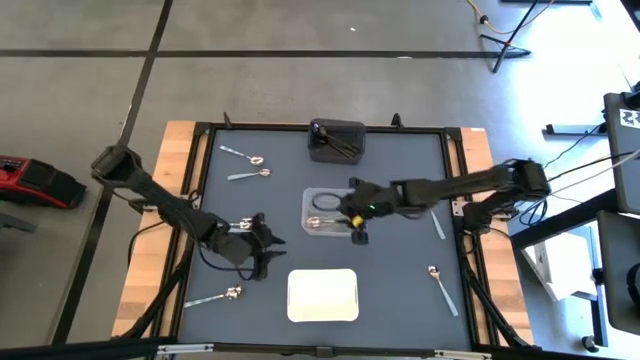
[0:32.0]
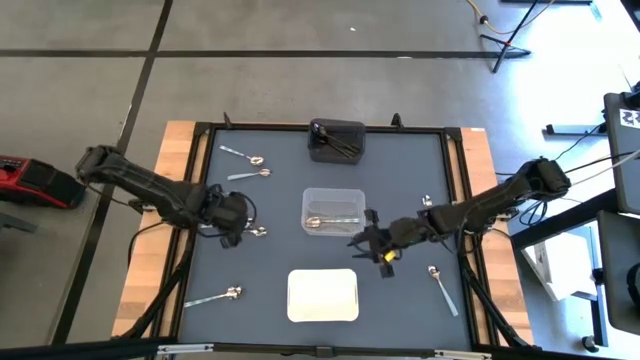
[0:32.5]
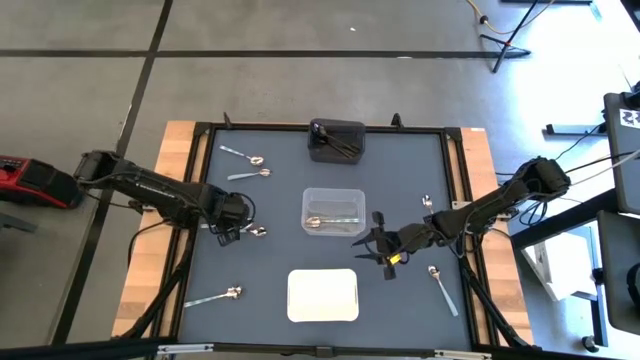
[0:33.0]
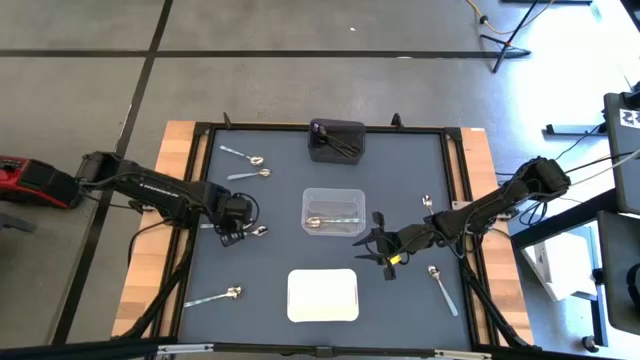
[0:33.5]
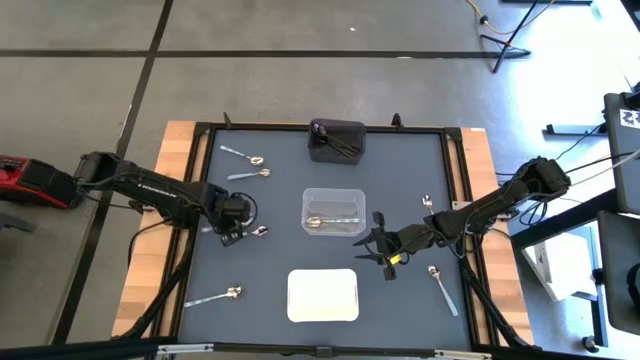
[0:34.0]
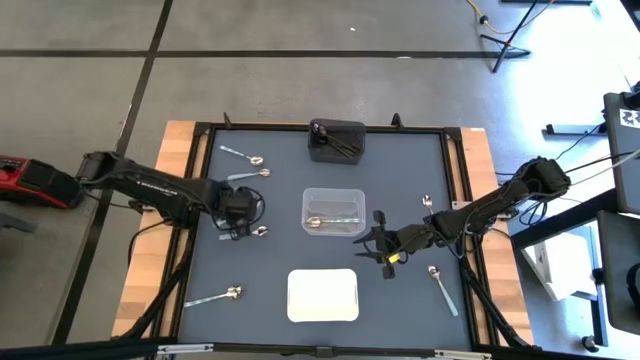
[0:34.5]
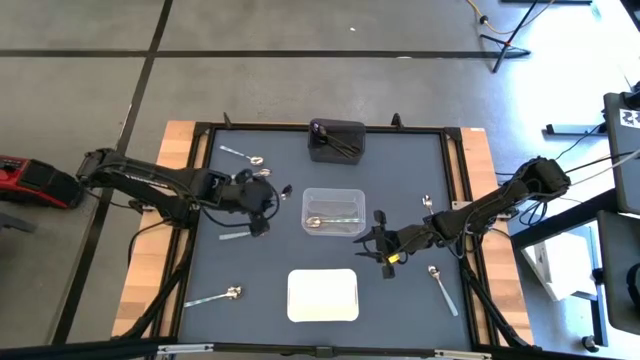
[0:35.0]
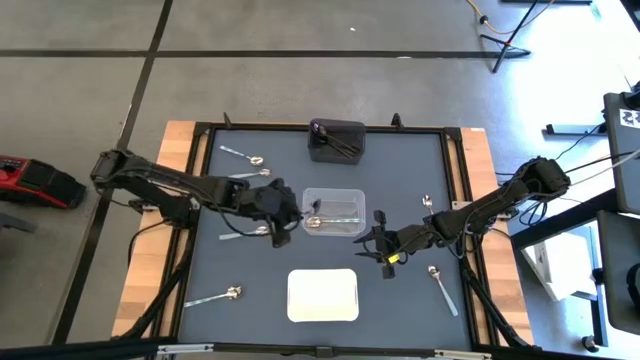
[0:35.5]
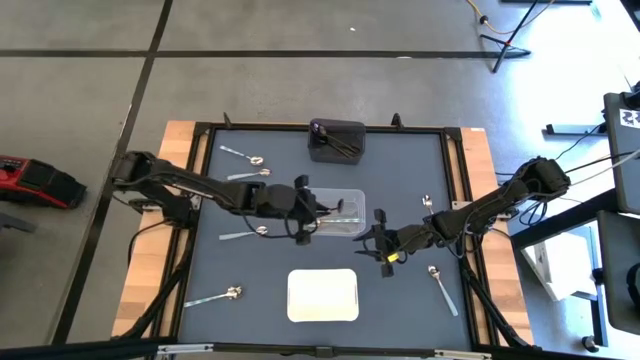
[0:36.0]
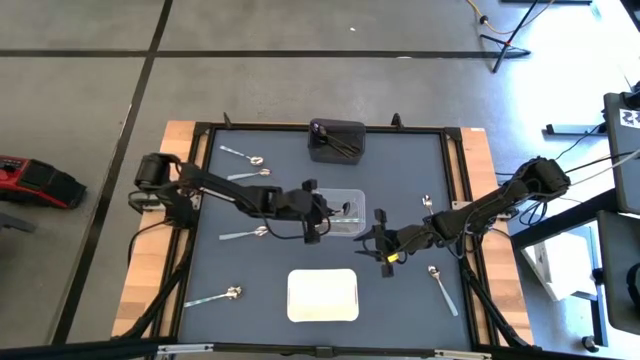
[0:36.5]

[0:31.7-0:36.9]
Task: Sort silverware by color (type)
Put the middle green patterned spoon into the transparent bin

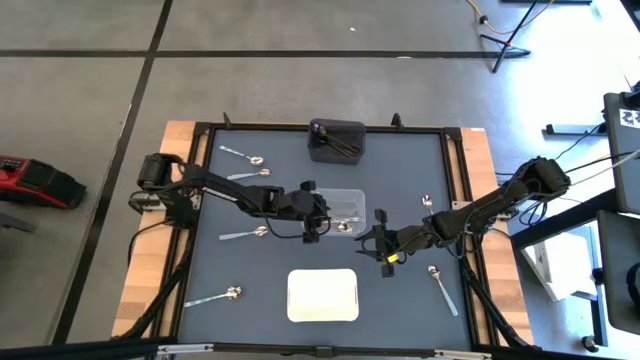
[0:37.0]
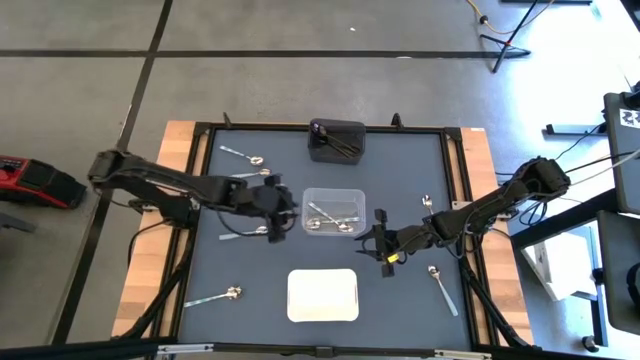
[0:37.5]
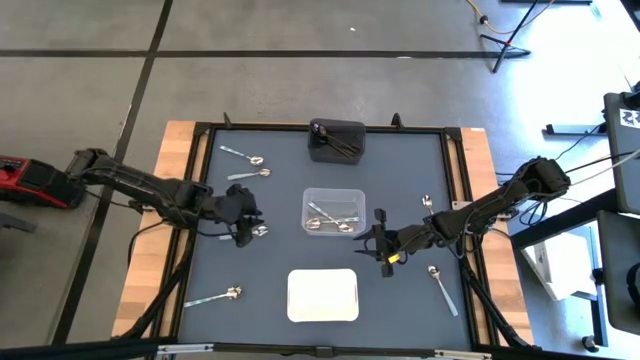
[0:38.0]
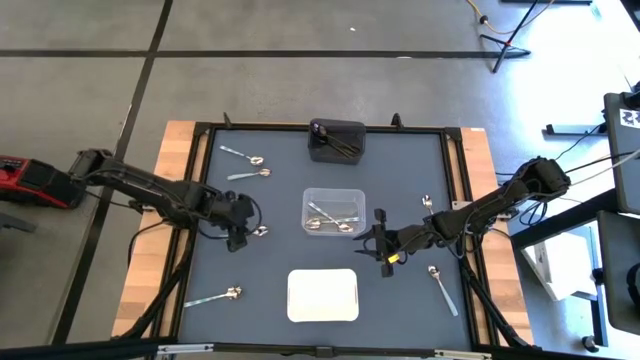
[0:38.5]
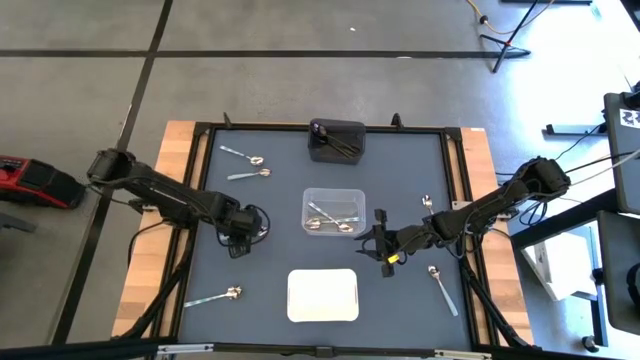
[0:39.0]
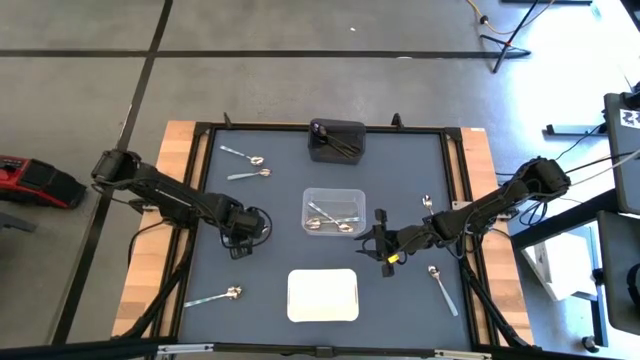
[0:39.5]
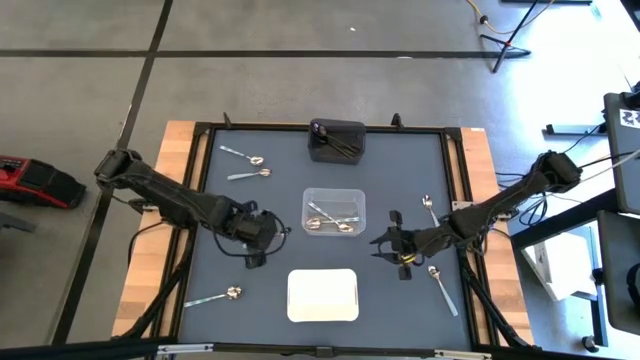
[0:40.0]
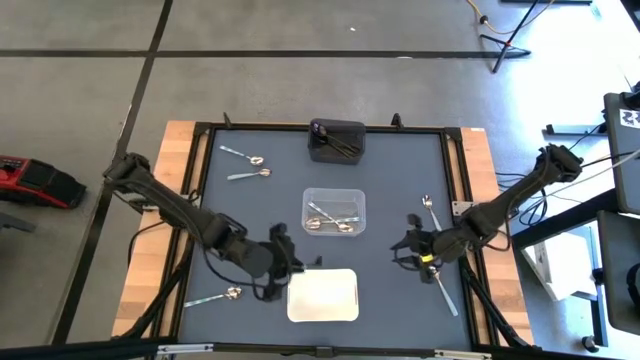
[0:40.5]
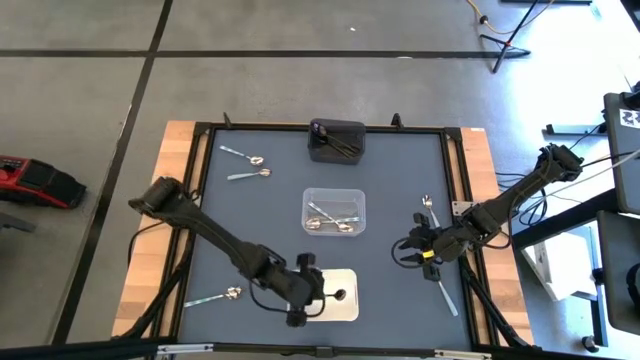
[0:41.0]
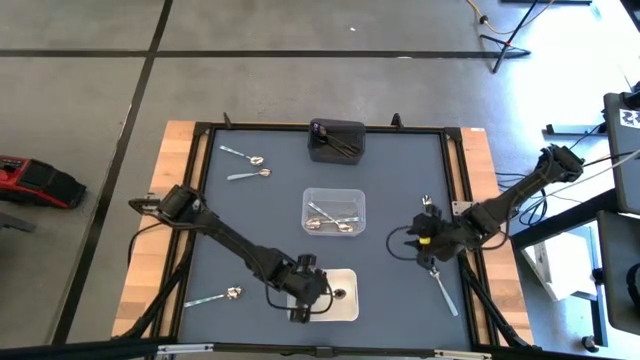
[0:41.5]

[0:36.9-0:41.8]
Put the middle left blue spoon into the white bin

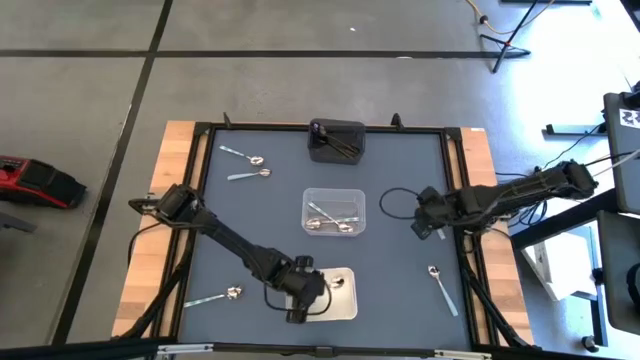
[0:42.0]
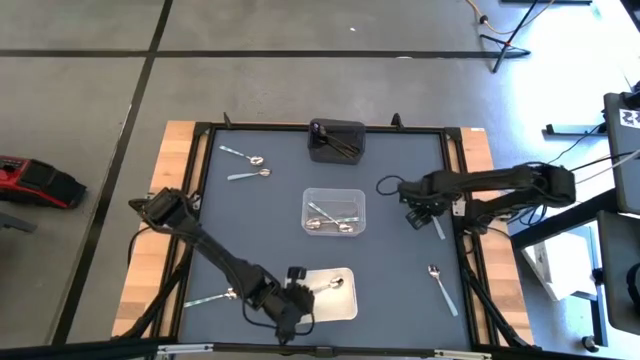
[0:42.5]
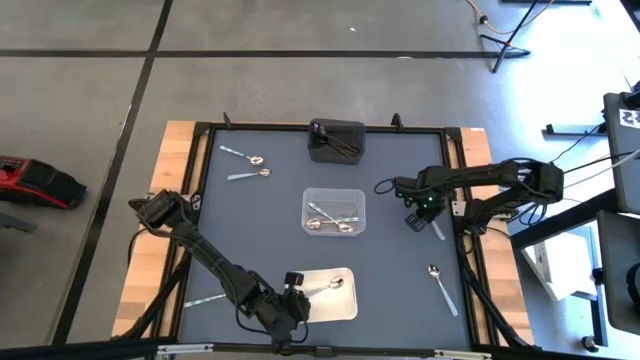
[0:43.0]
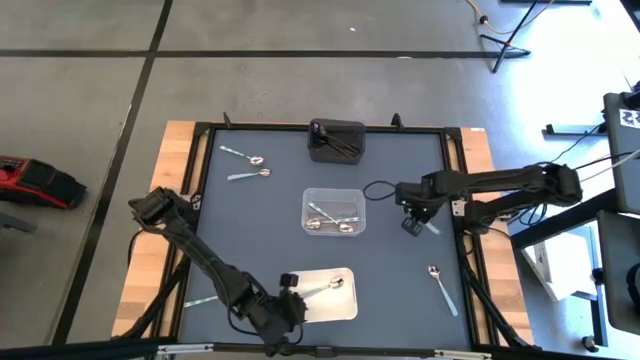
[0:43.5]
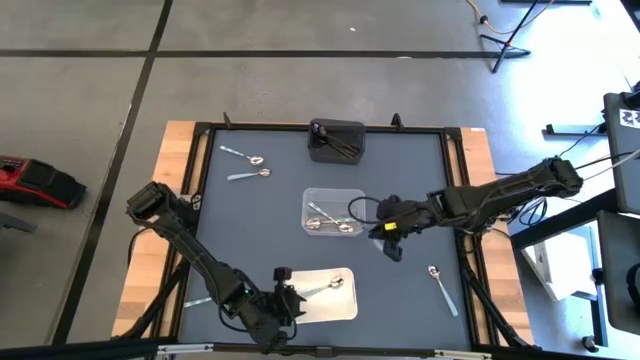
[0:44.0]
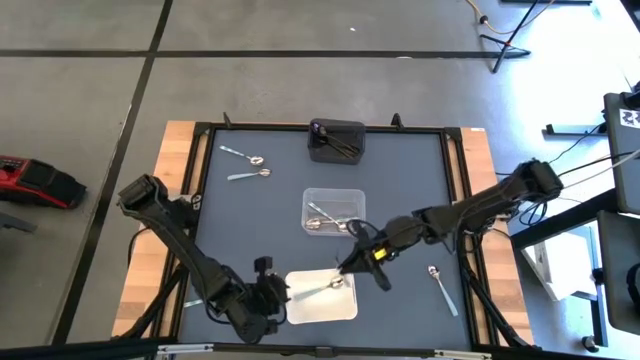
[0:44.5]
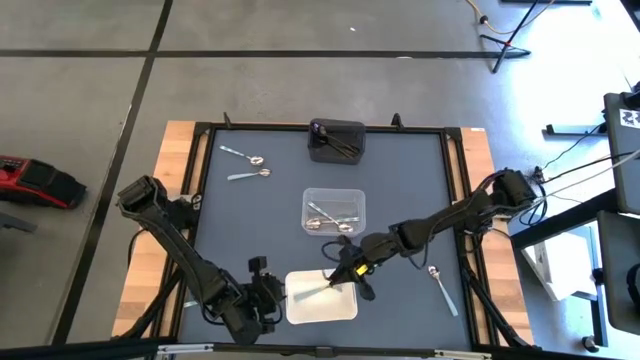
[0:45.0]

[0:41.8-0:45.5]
Put the middle right blue spoon into the white bin

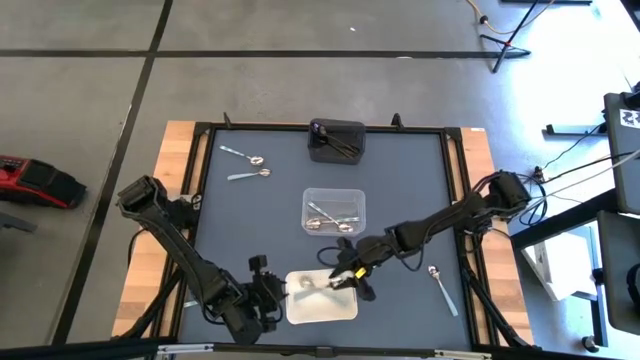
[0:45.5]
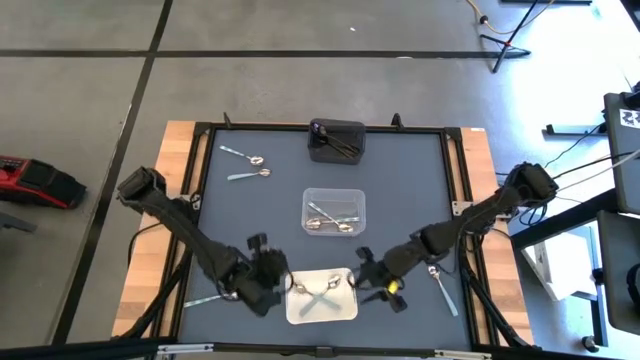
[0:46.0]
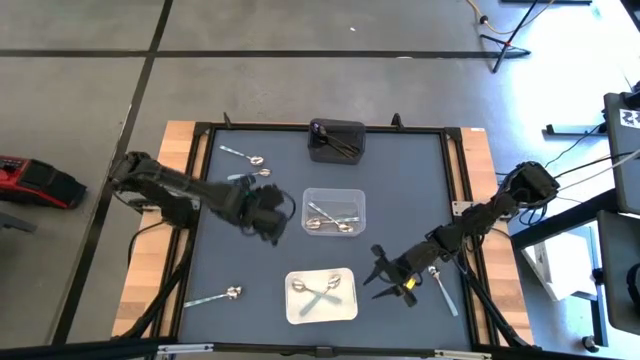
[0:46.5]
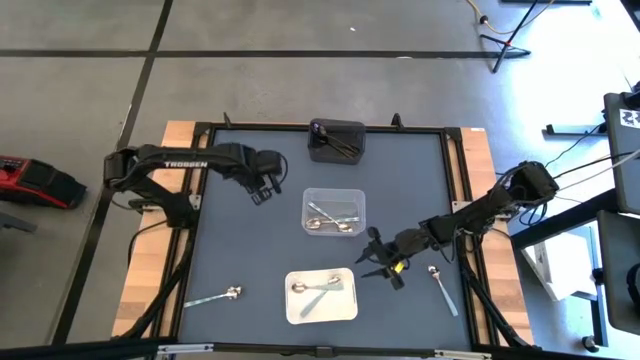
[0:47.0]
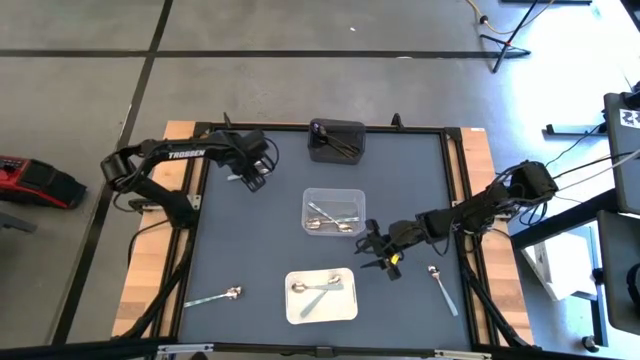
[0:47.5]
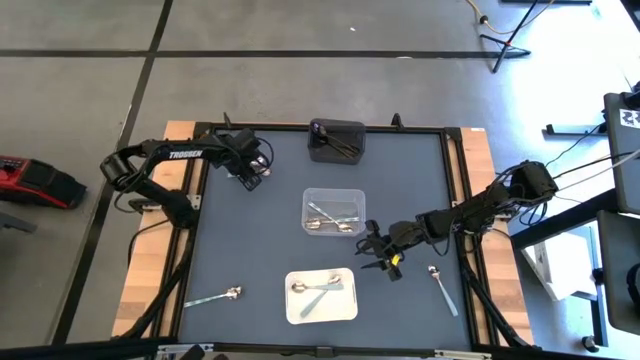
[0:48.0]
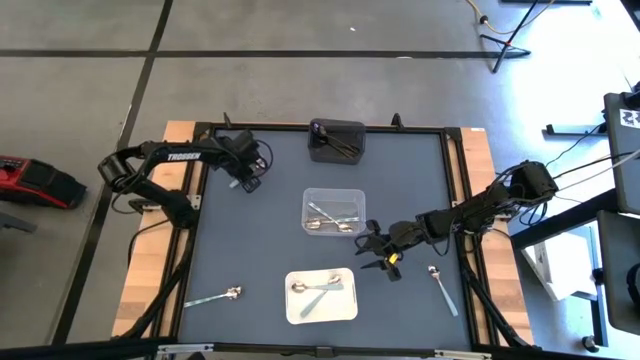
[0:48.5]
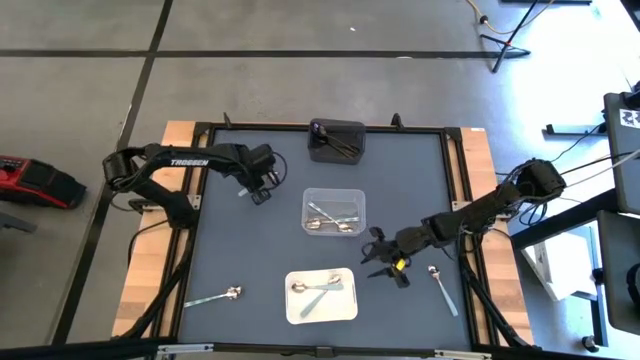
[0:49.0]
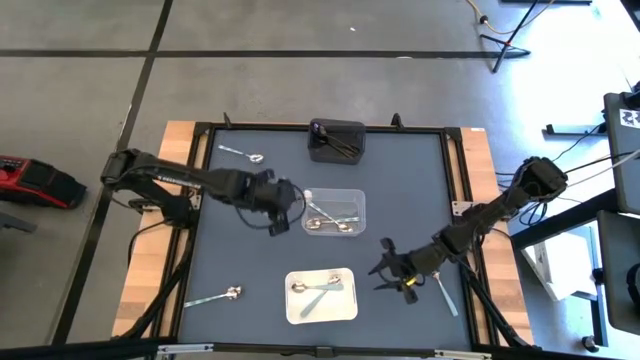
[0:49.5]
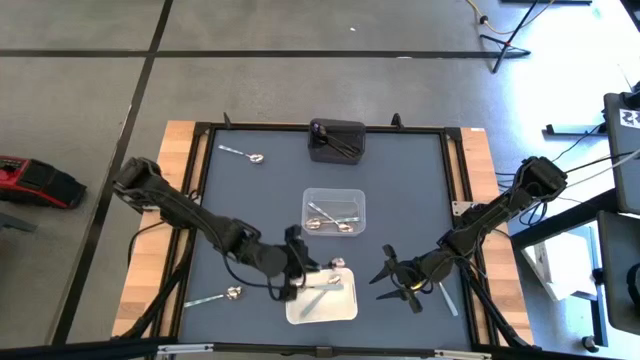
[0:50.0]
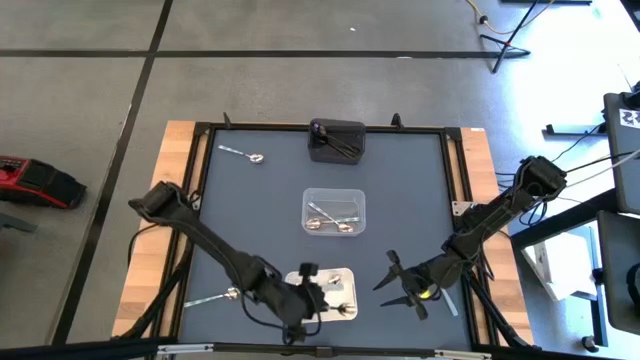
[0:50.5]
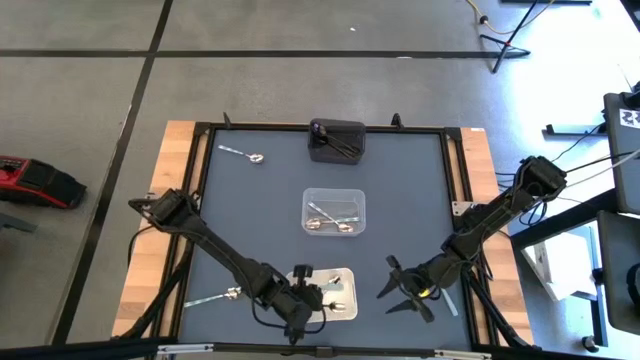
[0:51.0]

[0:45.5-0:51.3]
Put the top blue spoon into the white bin

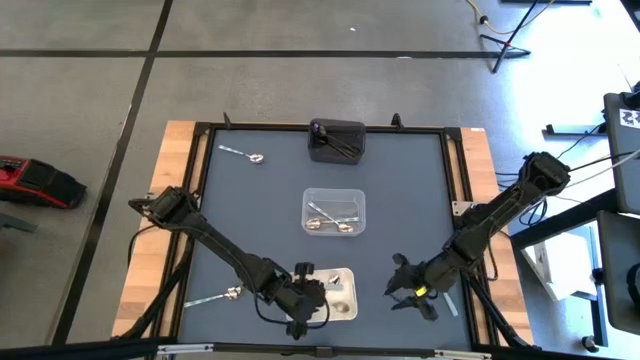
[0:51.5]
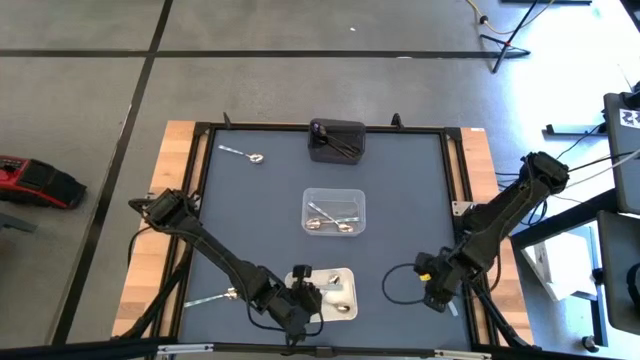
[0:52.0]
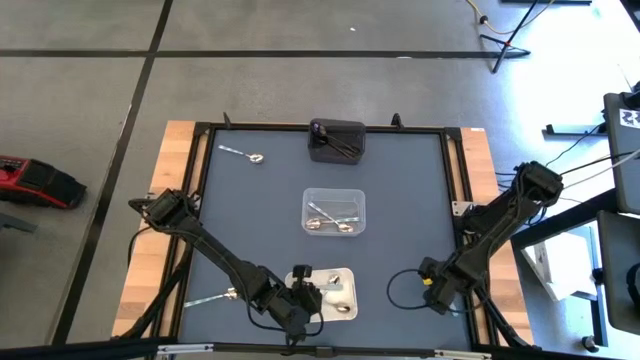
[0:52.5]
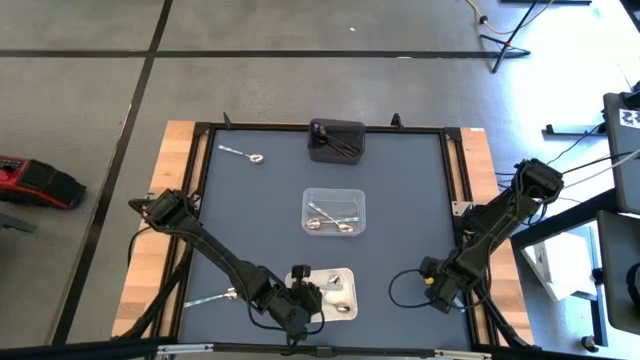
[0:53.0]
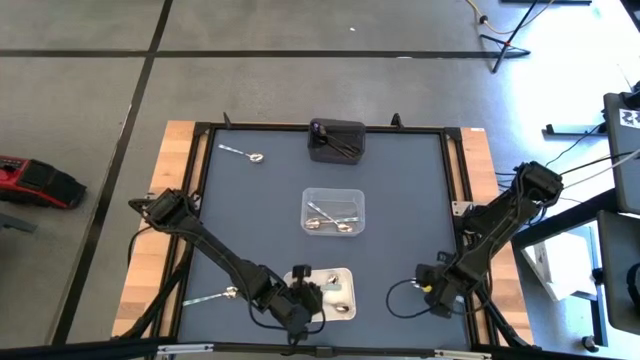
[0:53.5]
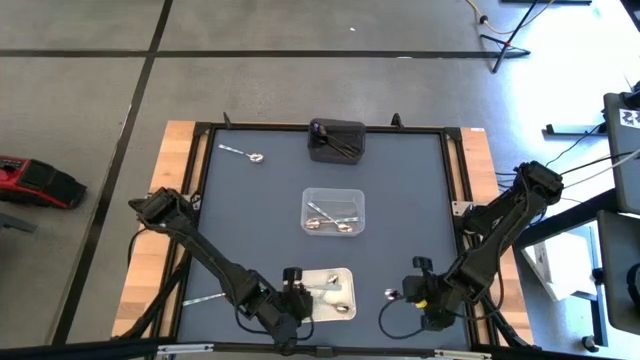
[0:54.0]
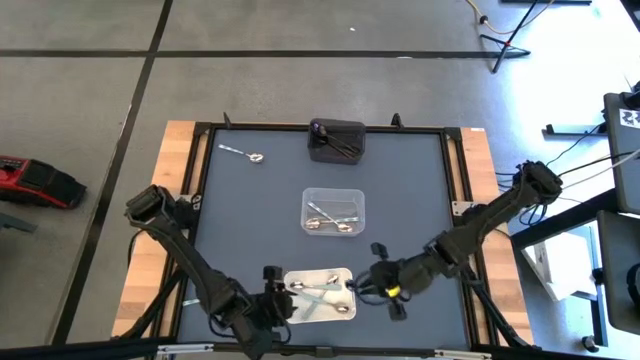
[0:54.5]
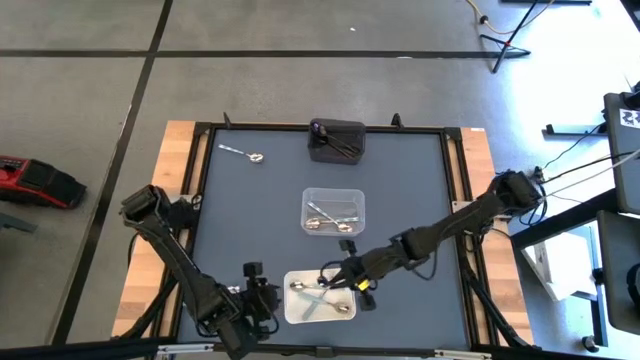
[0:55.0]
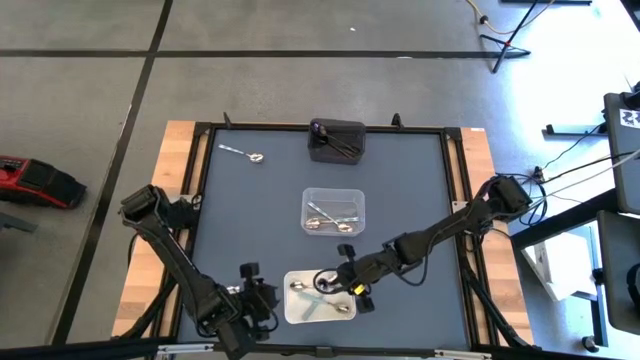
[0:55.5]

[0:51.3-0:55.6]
Put the blue spoon into the white bin
